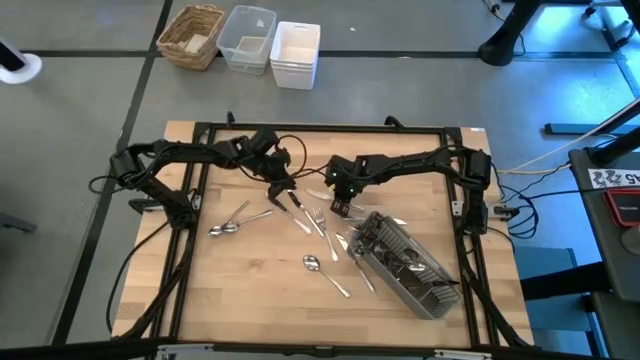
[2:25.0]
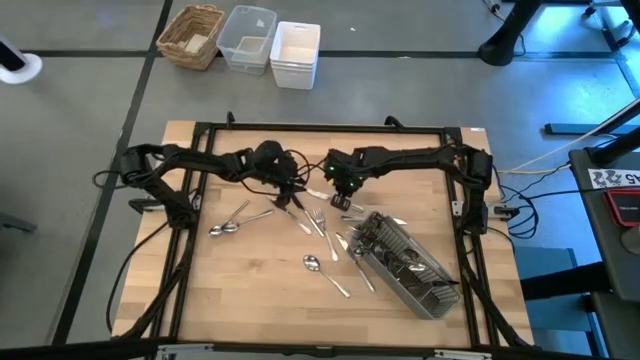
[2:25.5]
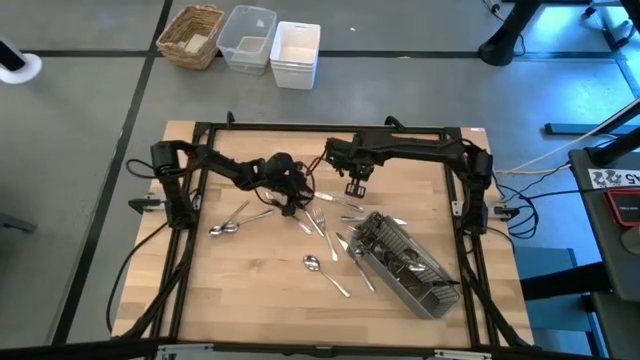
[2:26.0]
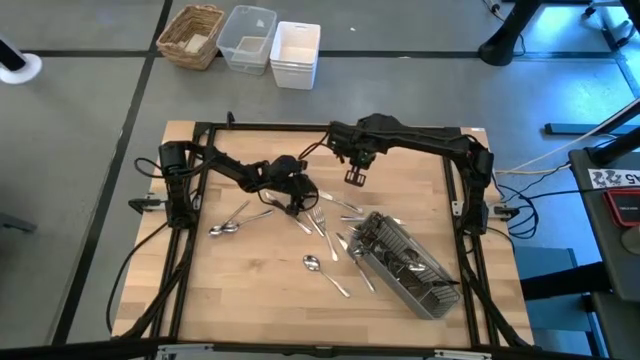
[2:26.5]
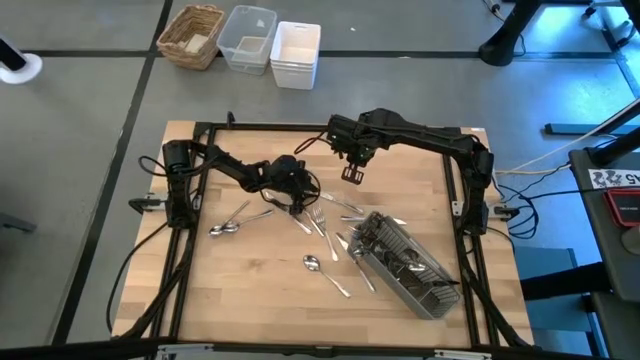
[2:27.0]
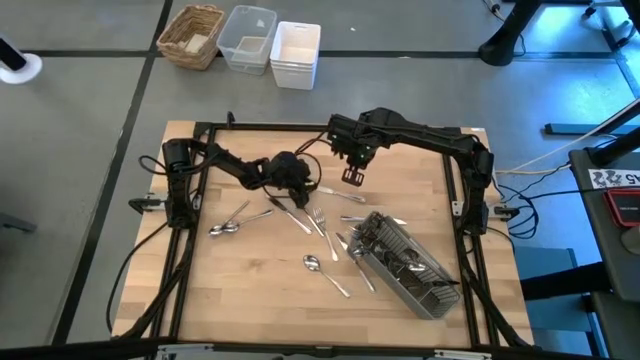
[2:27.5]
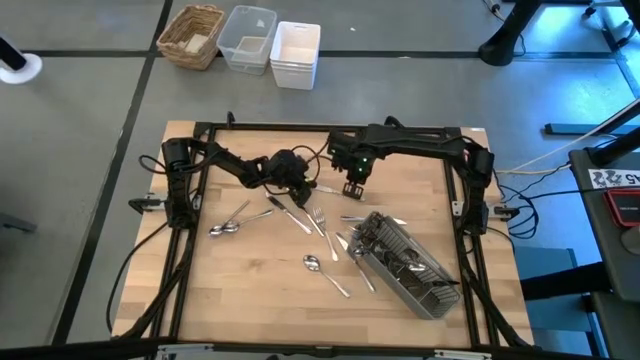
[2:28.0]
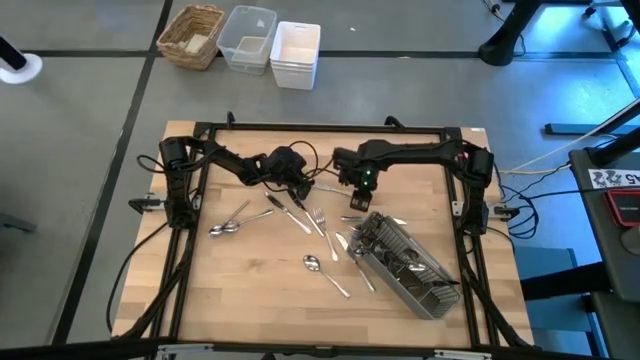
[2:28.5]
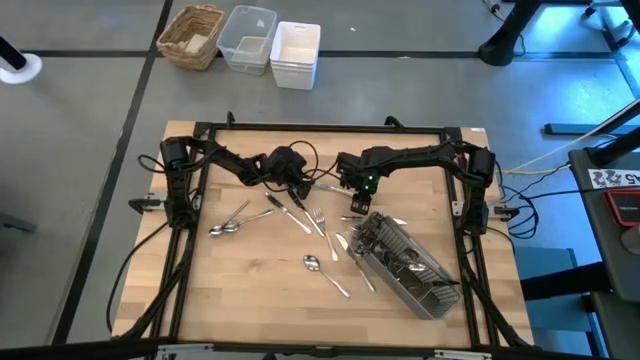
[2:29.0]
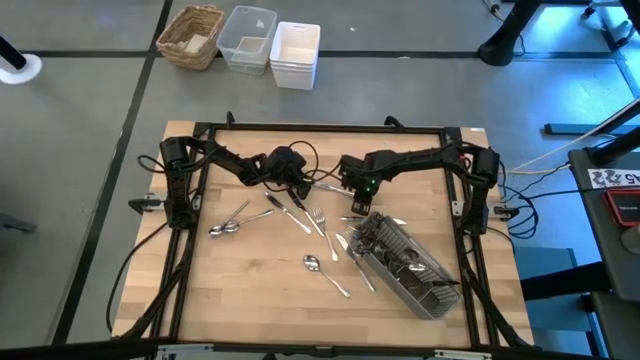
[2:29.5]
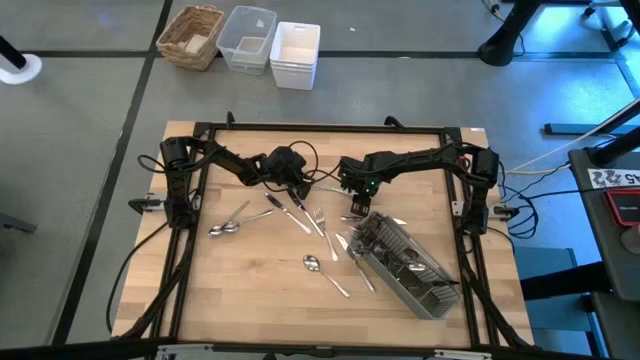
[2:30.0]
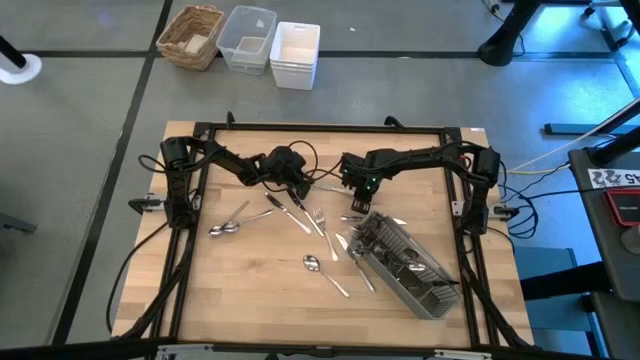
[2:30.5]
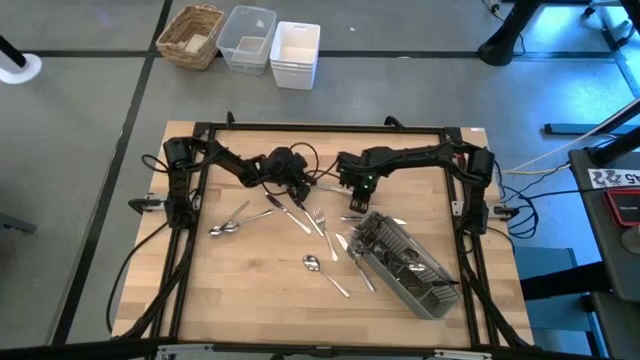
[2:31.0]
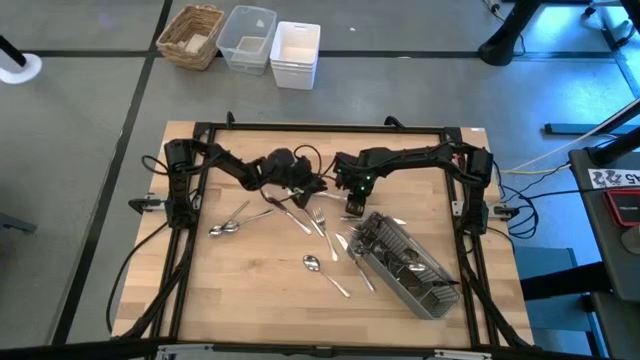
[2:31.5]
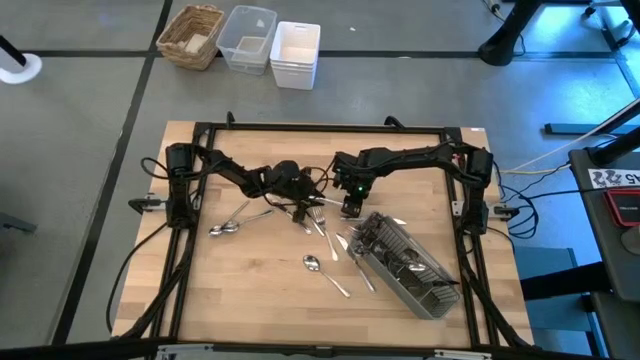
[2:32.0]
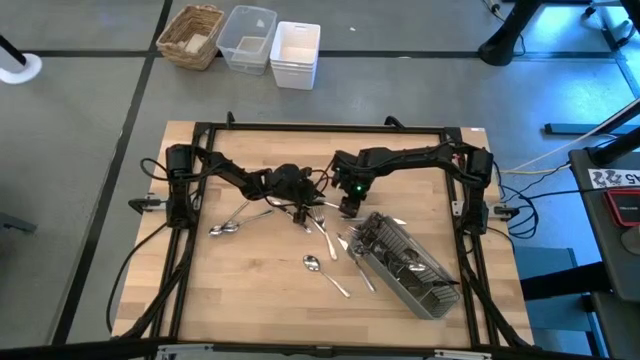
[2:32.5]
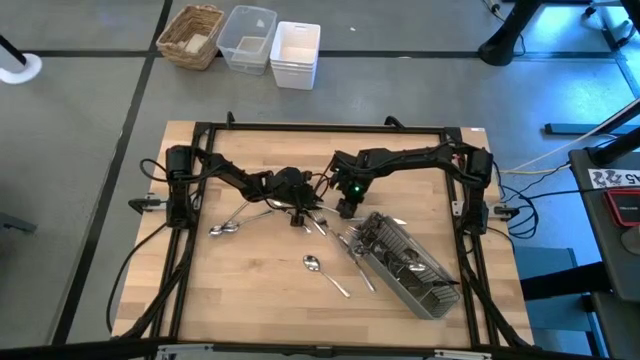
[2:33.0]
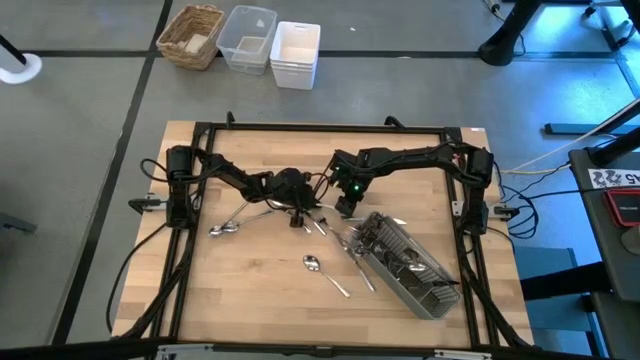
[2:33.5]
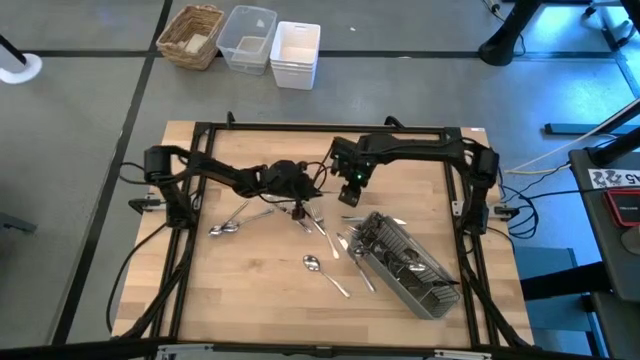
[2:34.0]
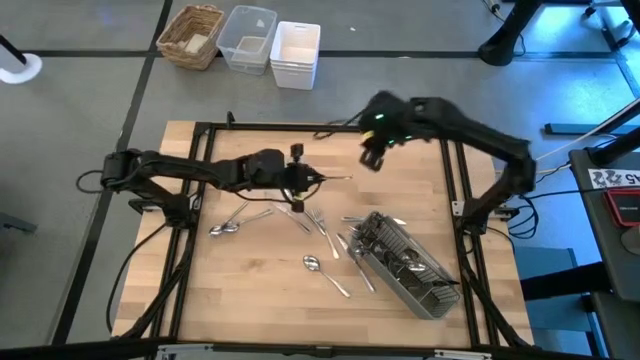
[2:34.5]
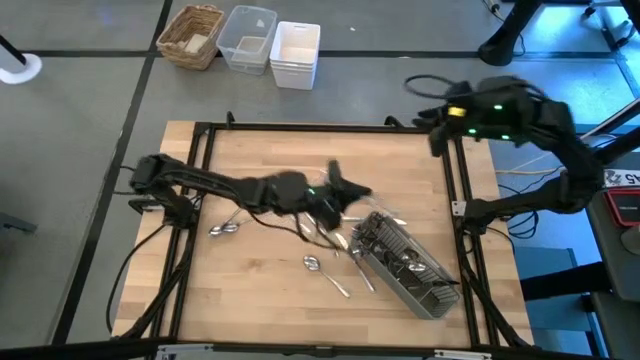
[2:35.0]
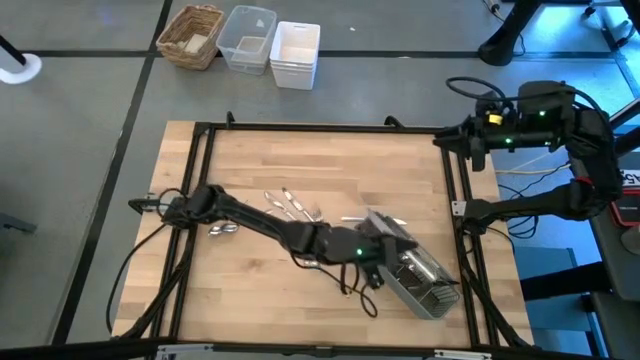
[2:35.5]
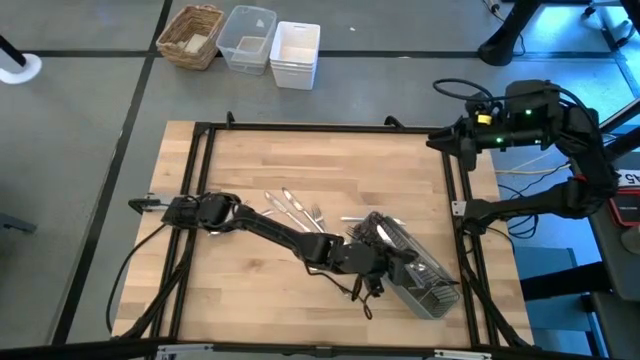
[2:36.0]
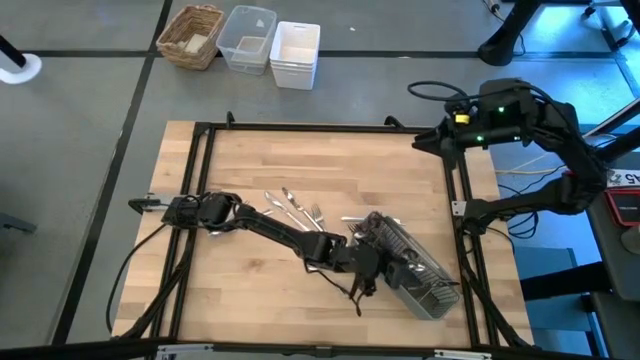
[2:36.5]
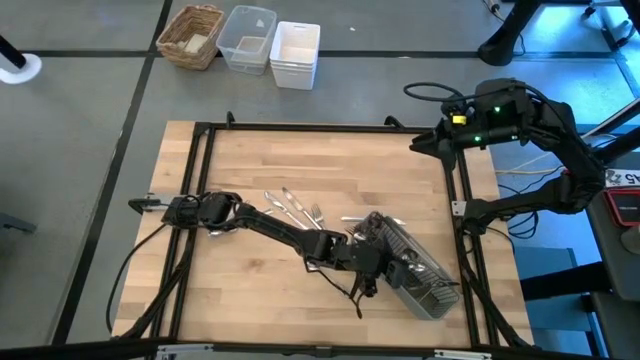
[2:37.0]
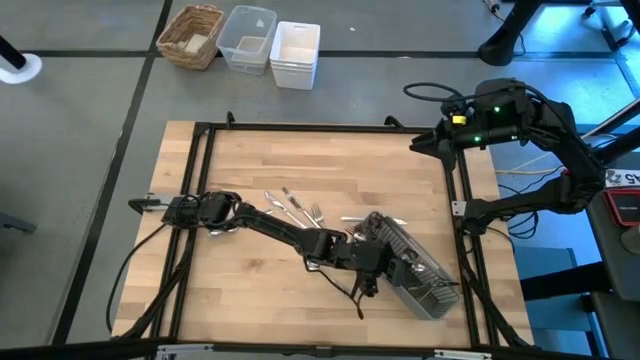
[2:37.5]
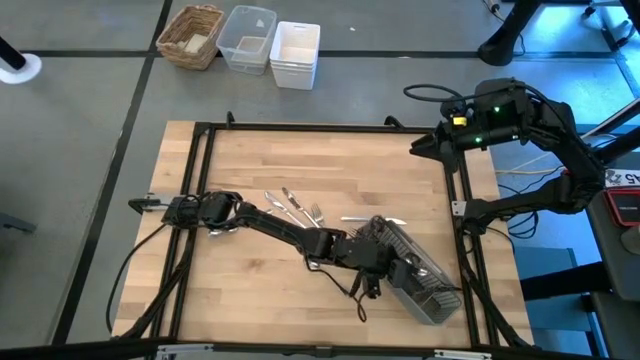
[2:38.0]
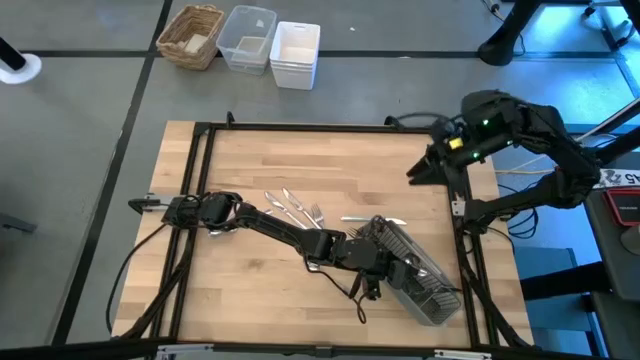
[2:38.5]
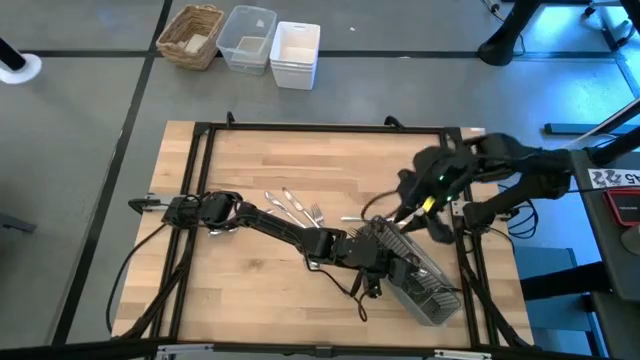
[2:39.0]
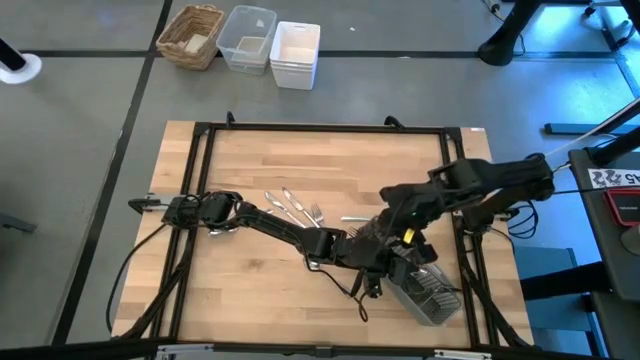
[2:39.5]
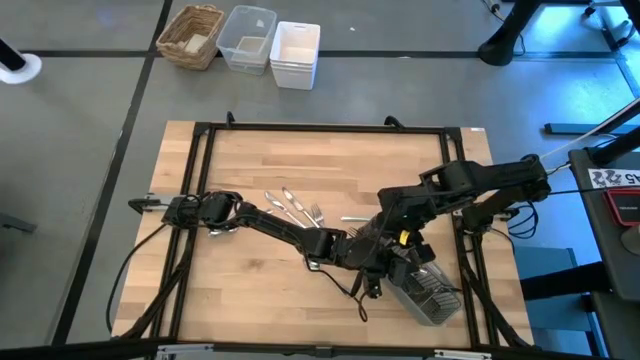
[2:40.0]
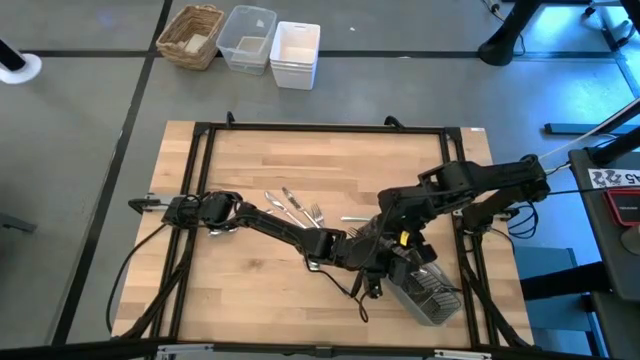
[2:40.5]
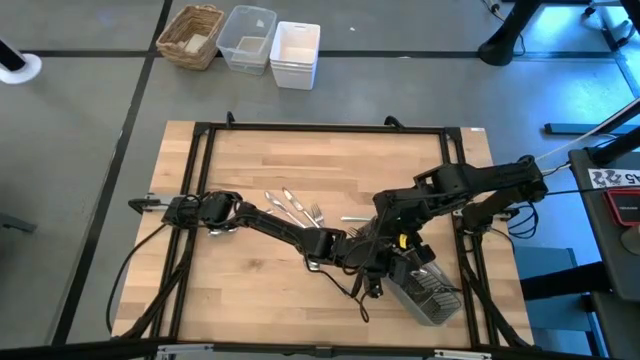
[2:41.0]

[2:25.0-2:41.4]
Task: Sort silverware
Put the silver table knife into the gray silverware basket

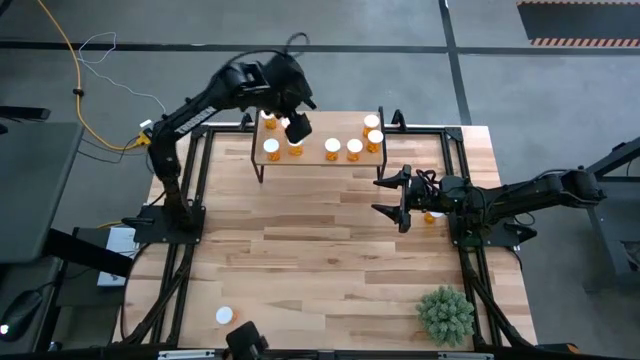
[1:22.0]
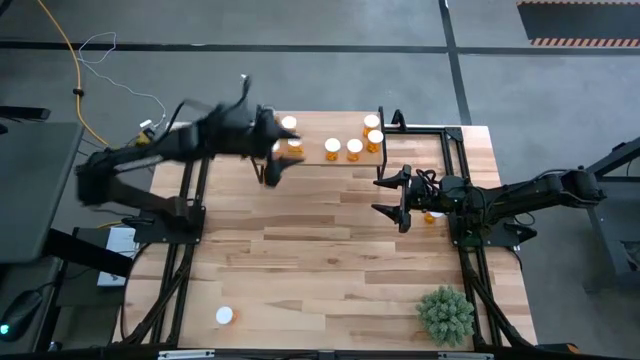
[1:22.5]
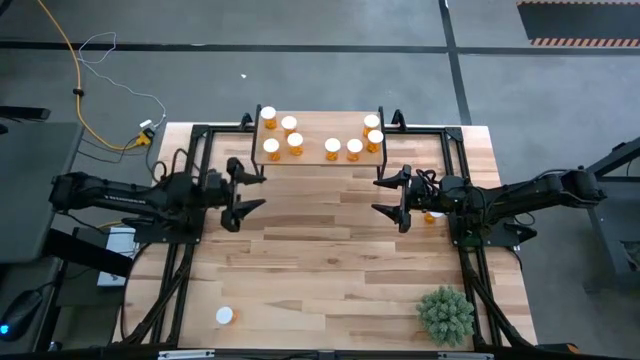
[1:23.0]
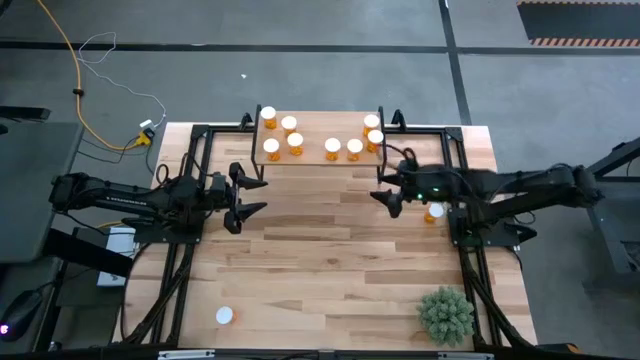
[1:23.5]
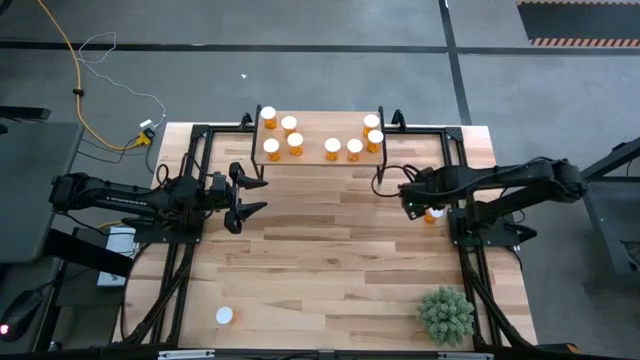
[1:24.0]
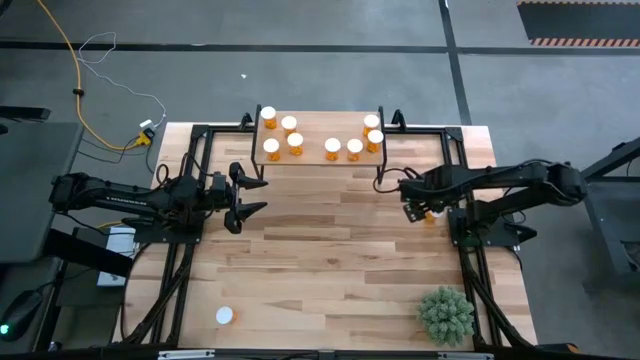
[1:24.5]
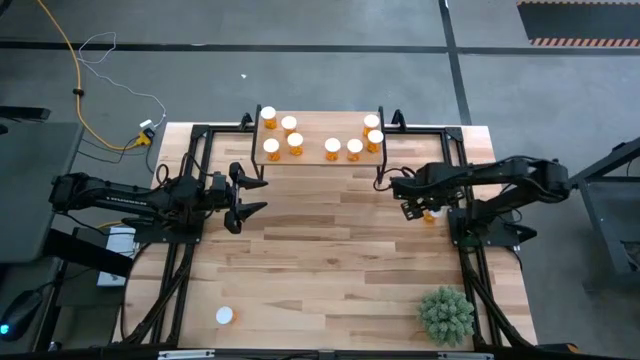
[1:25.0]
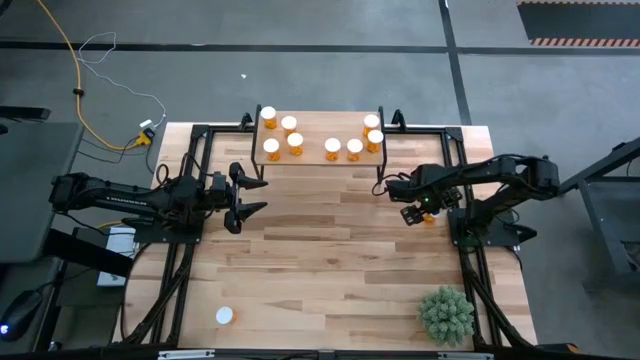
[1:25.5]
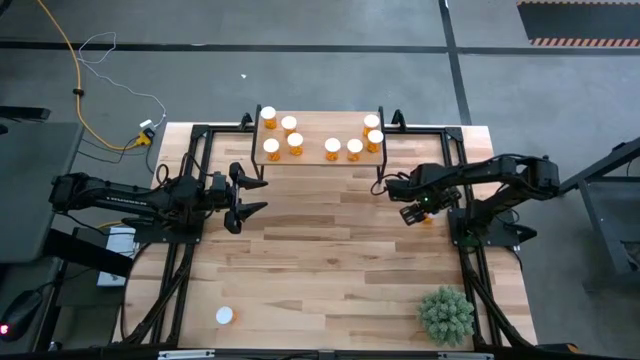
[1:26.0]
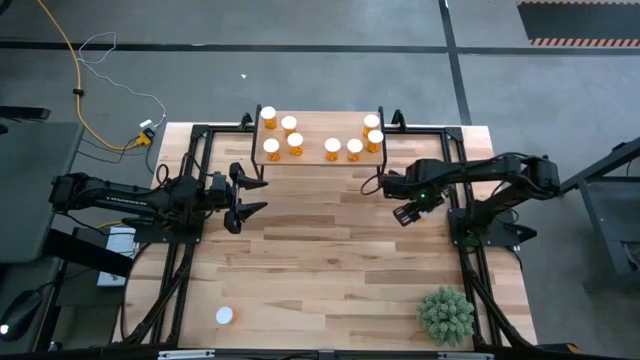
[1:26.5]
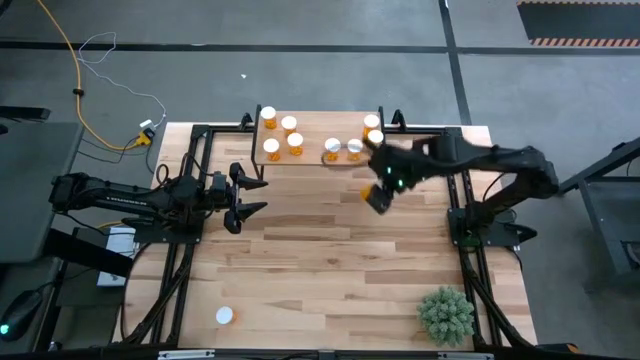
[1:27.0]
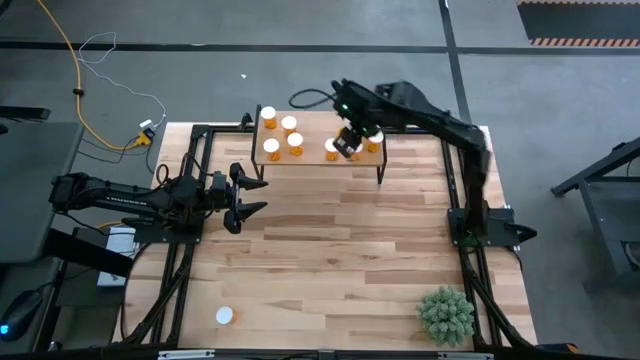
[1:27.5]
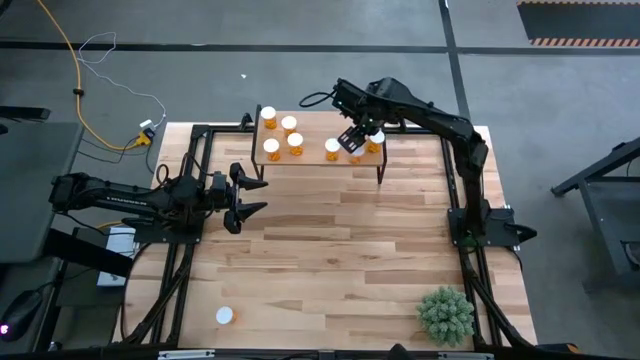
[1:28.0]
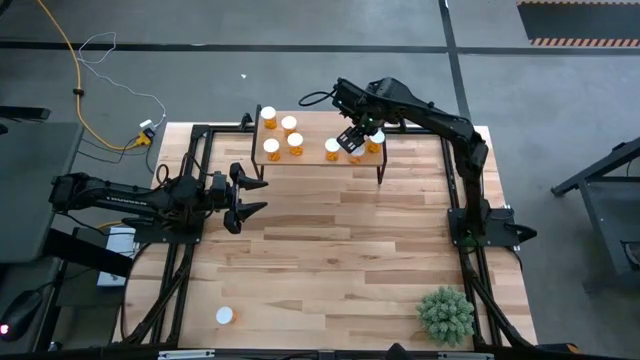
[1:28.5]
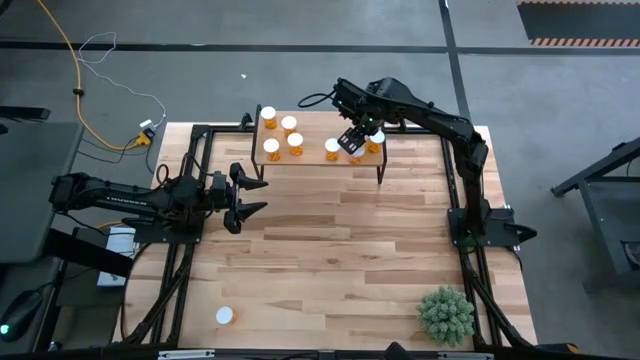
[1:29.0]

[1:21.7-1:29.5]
Task: Pick and place medicine bottles onto shelf by color
Put the orange pill bottle on the shelf
